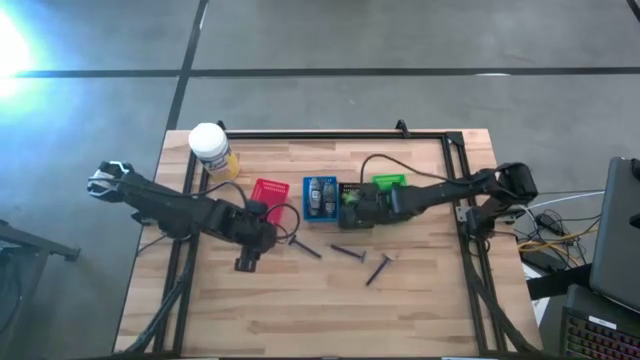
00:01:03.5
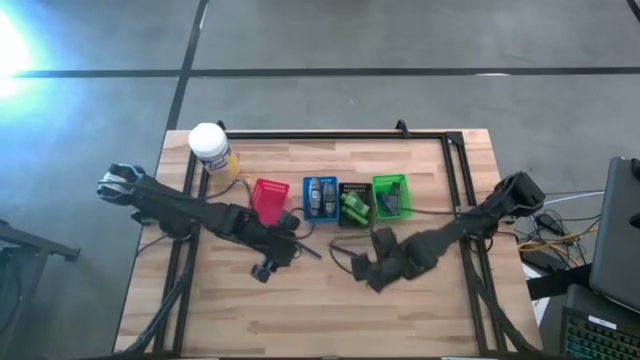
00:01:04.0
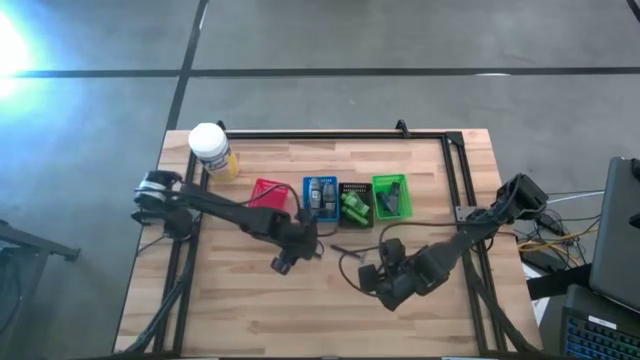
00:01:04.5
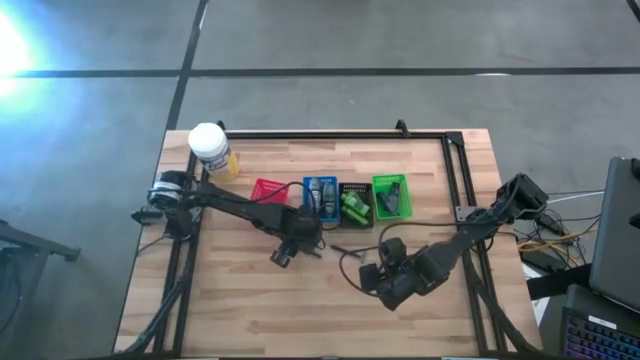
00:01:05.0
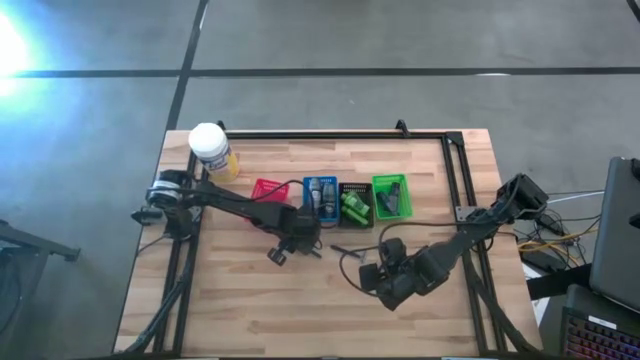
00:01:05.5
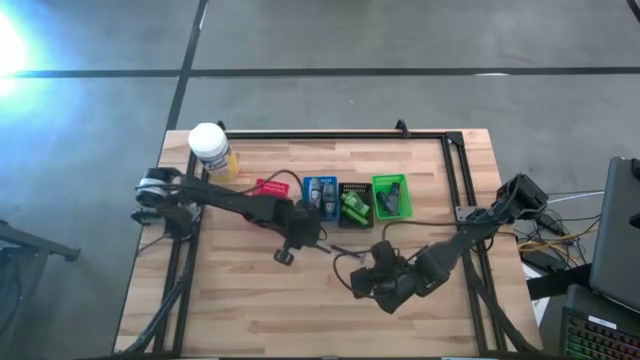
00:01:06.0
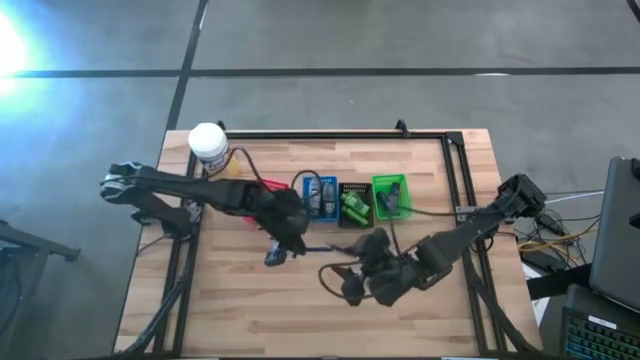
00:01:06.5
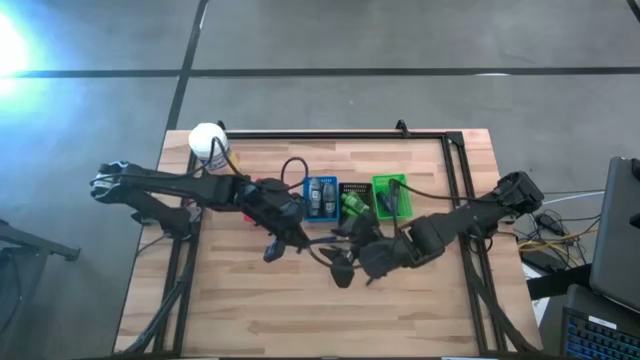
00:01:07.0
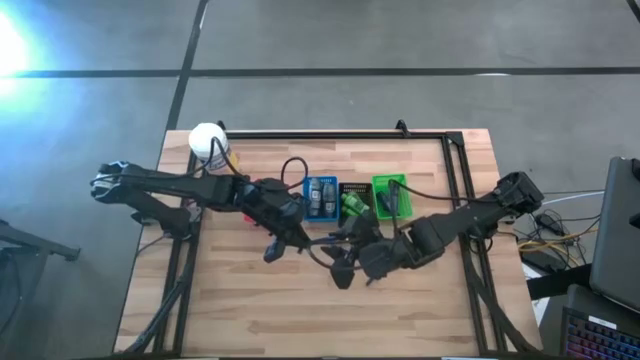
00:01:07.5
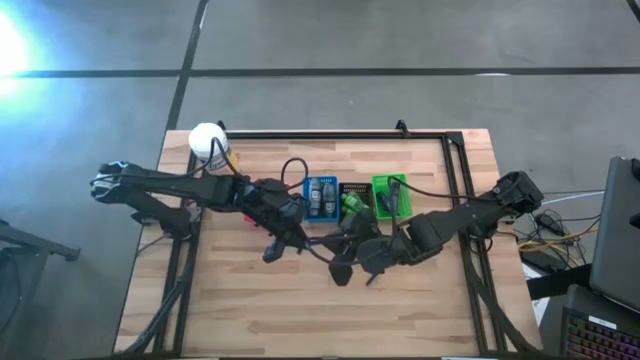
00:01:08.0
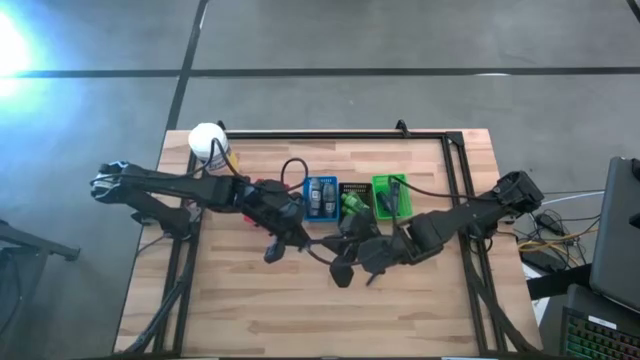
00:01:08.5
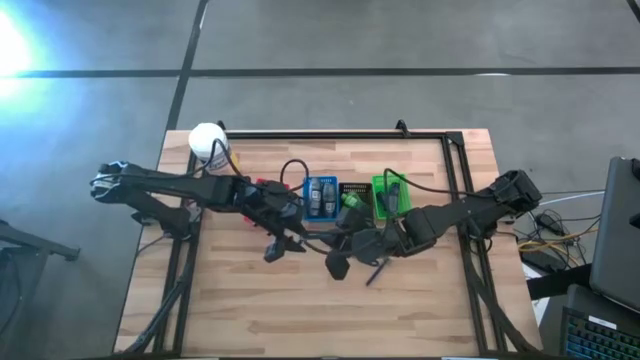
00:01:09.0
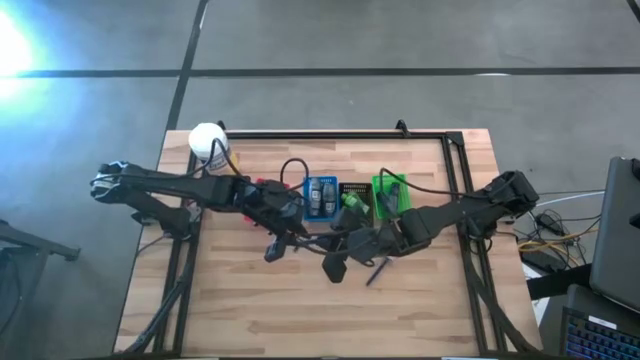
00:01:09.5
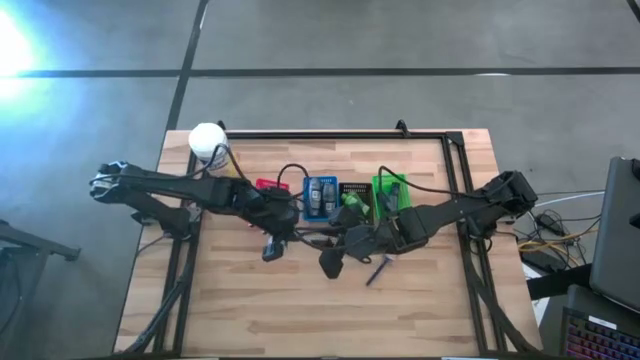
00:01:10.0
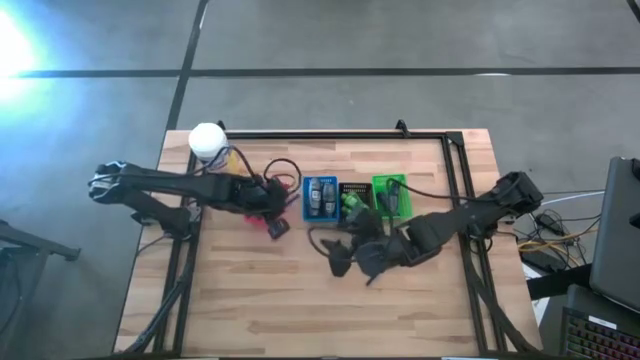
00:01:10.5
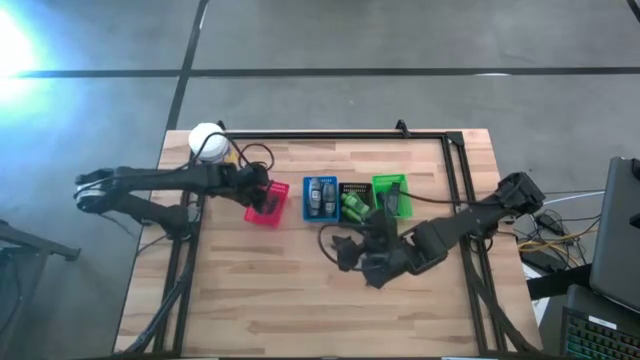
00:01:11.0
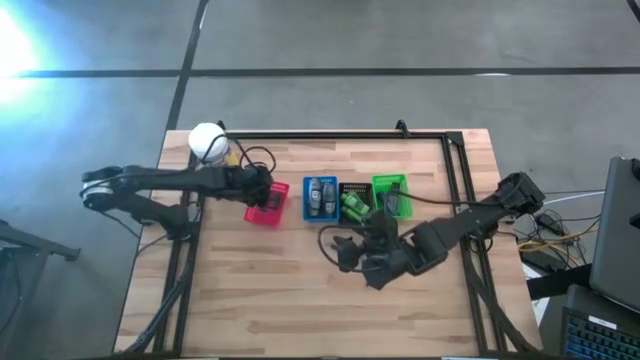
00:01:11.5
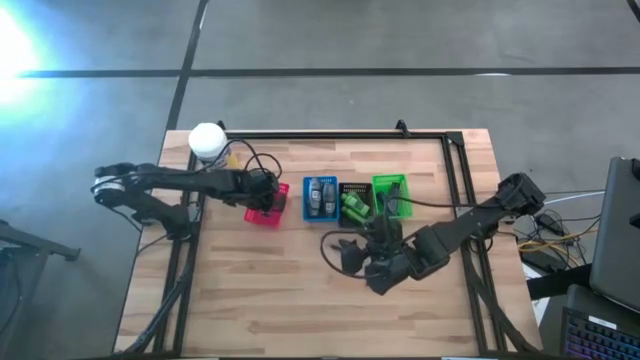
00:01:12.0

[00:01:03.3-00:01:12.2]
Task: Pick & Place Travel size toiletries
Put the blue razor into the red basket

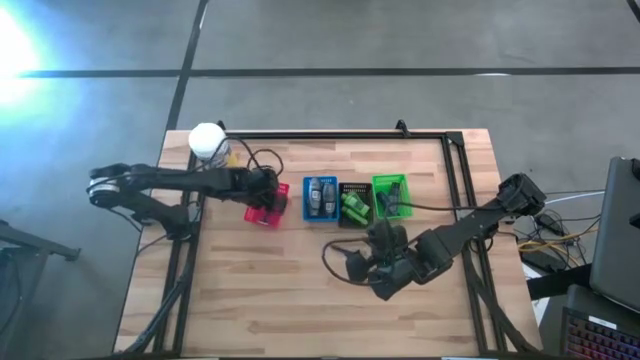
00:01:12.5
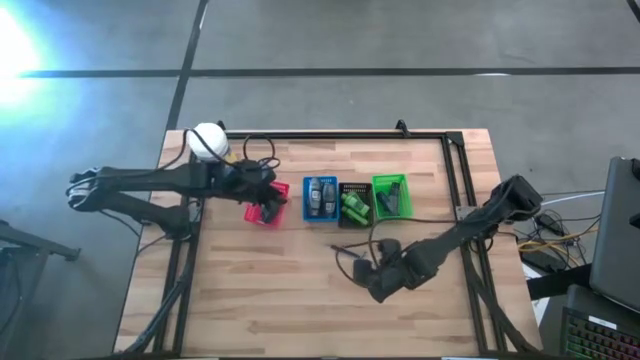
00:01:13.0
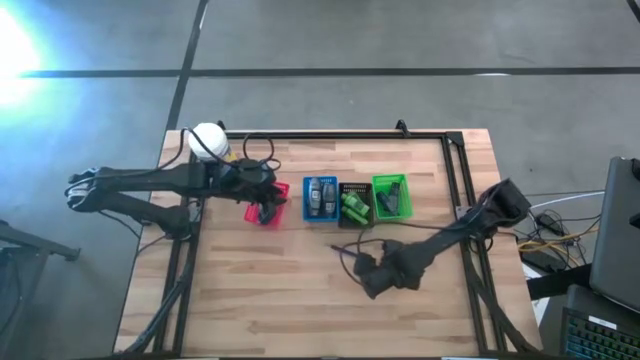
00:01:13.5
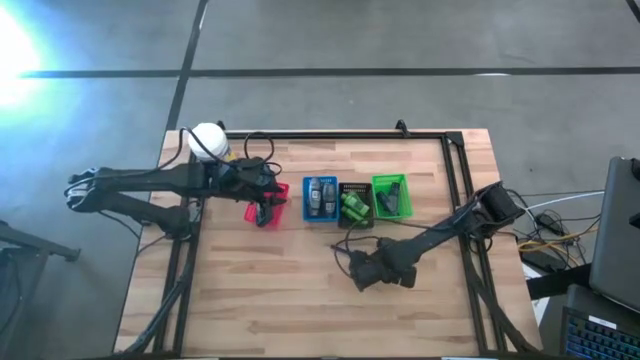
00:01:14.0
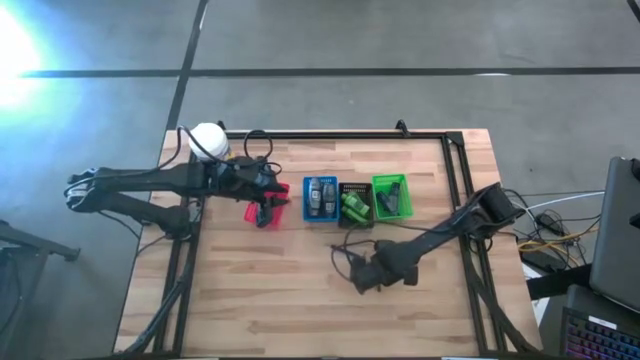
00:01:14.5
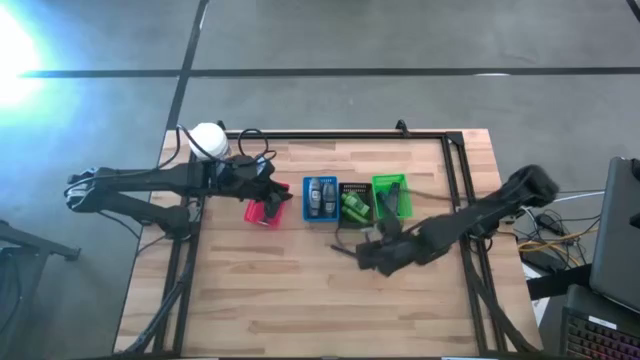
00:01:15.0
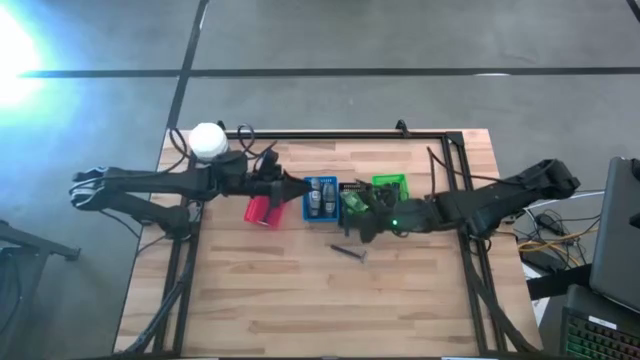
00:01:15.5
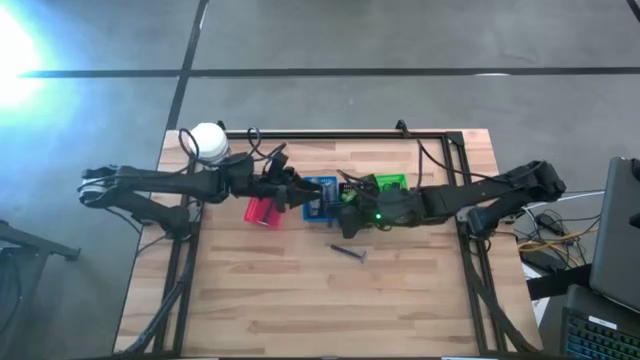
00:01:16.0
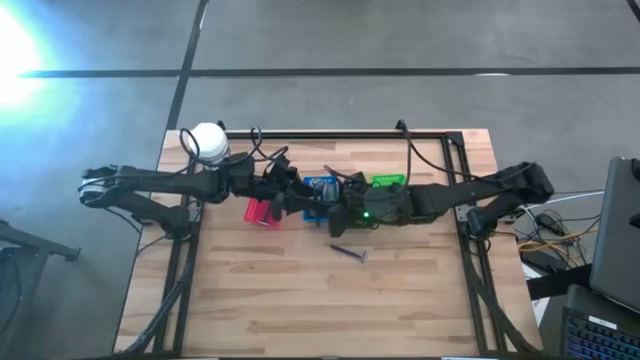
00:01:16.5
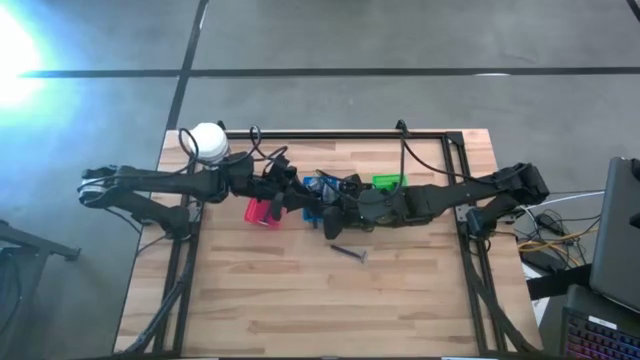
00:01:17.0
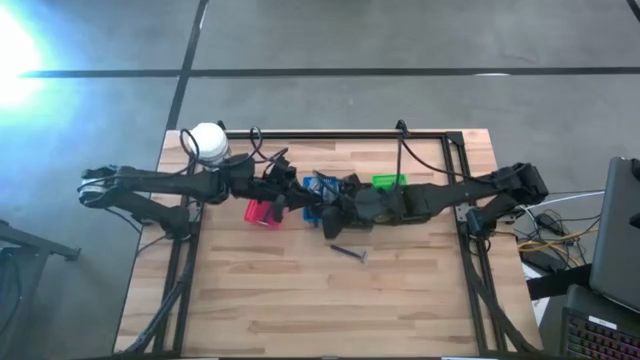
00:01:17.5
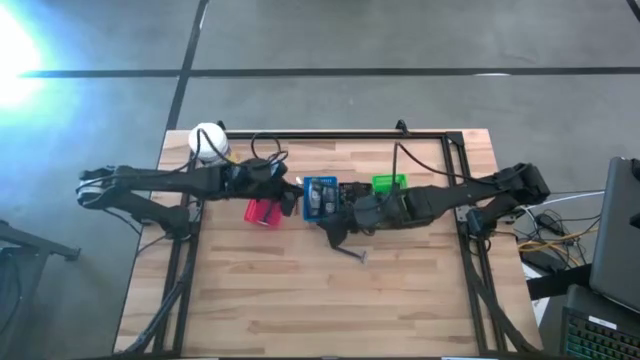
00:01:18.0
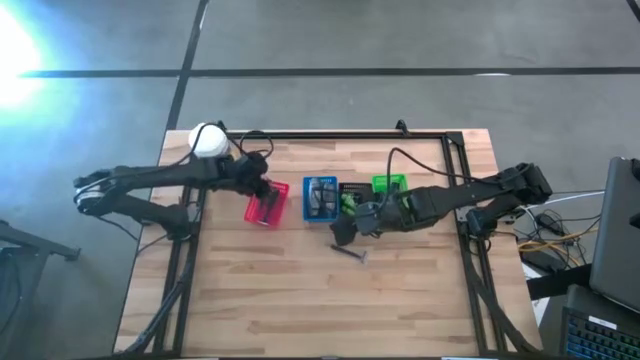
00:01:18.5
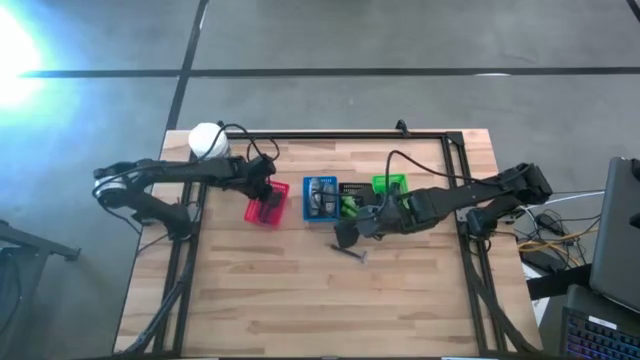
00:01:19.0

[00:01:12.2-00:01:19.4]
Put the blue razor into the red basket

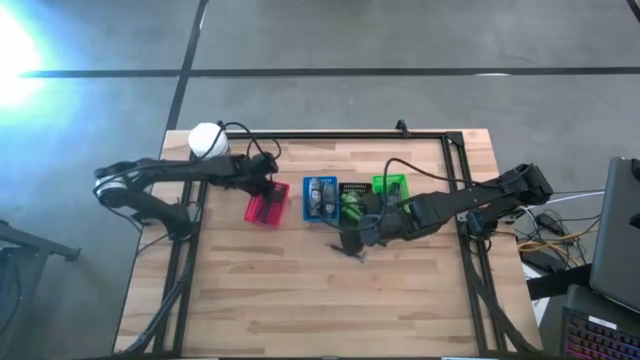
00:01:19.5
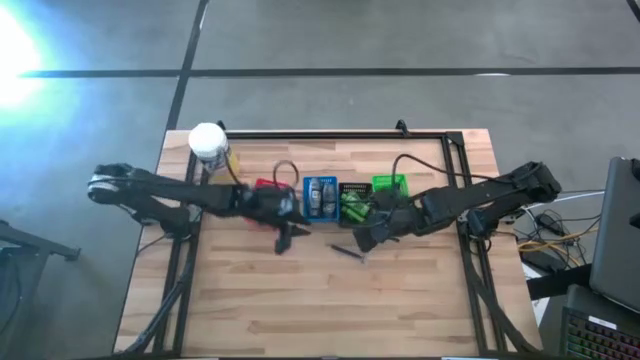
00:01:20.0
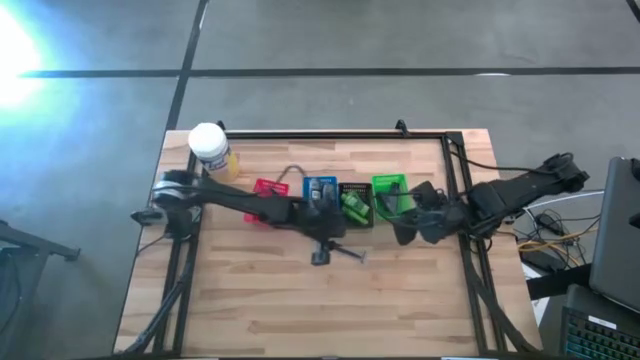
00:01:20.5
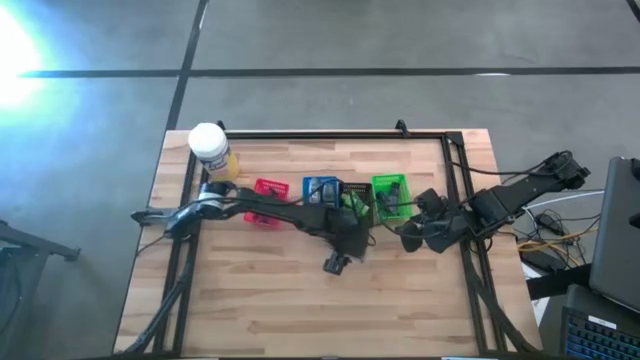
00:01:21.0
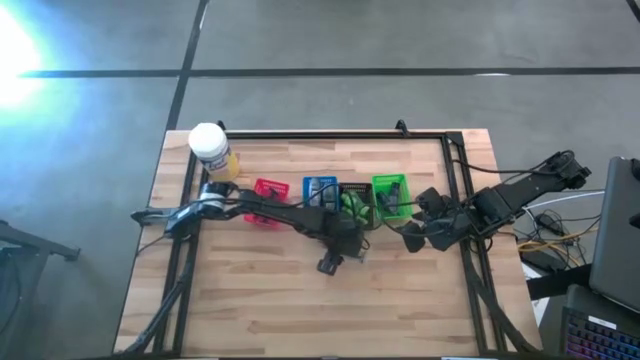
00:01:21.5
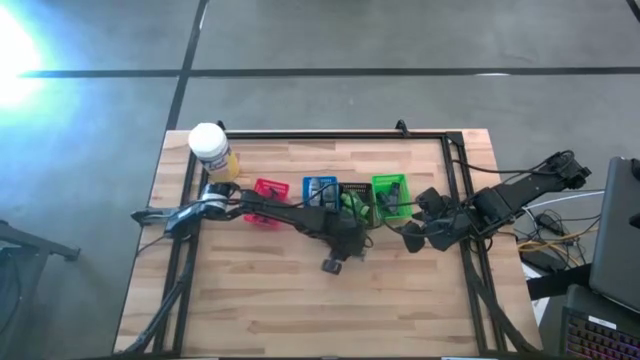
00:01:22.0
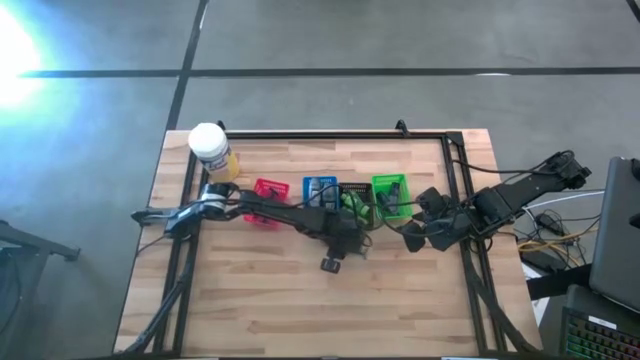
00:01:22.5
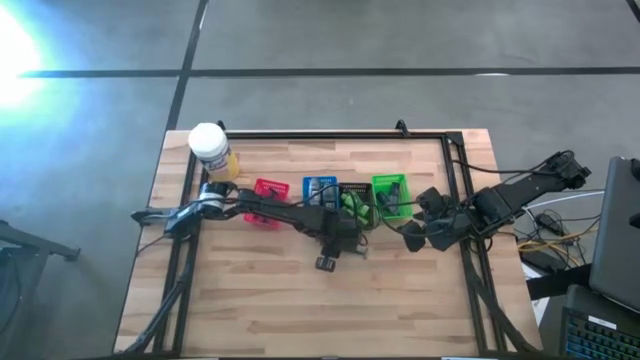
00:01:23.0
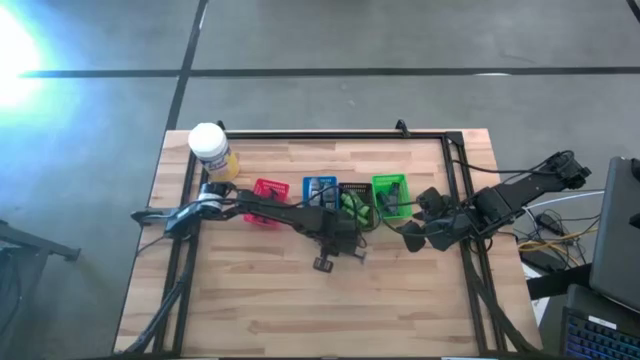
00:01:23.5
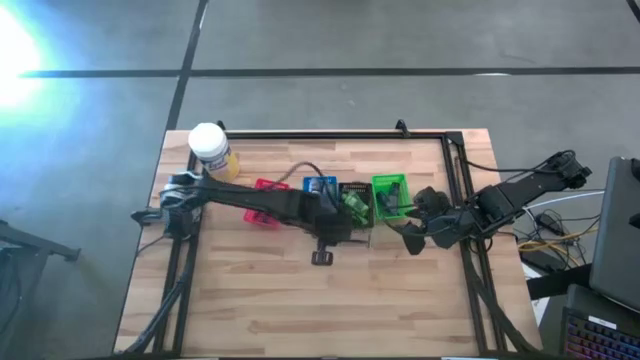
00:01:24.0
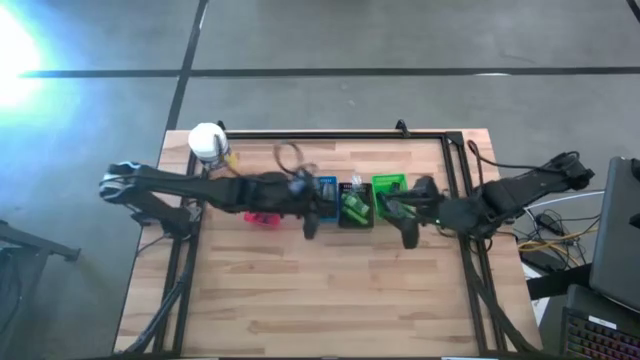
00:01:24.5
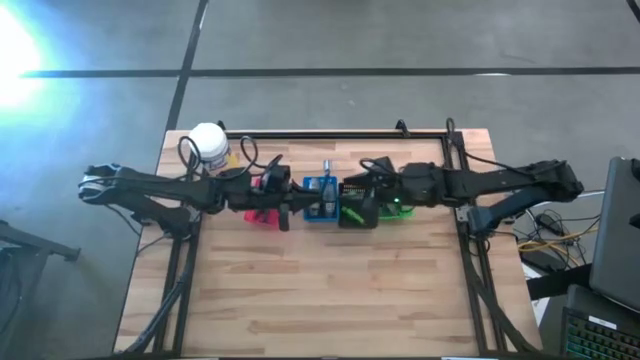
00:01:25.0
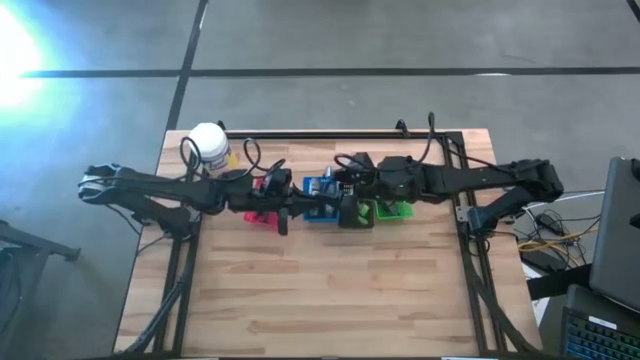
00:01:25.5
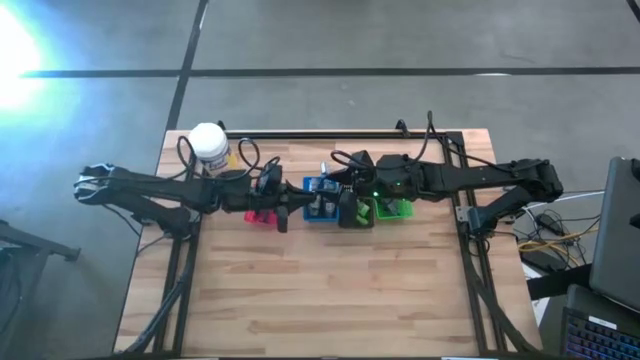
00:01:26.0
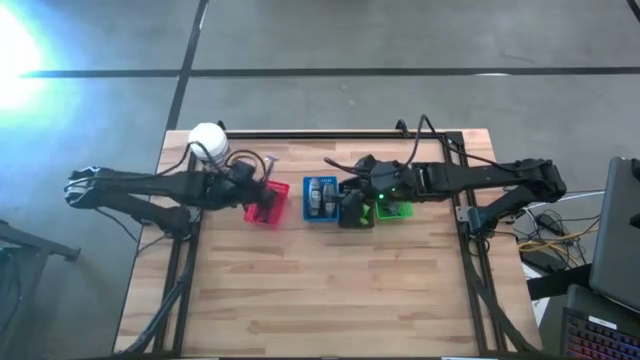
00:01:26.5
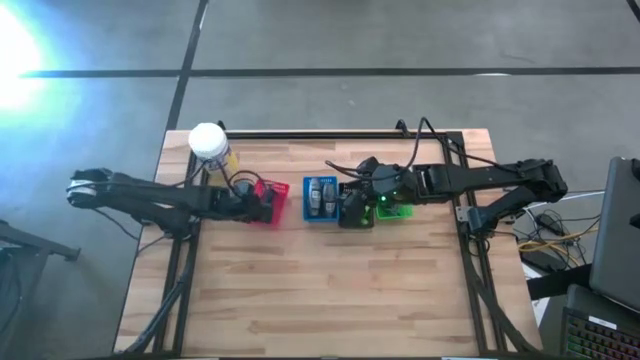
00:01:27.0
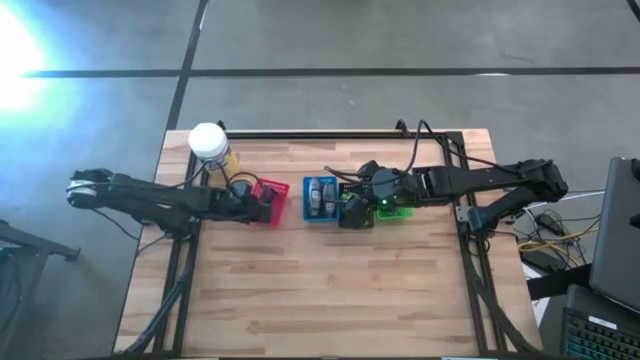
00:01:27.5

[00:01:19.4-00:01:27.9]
Put the blue razor into the red basket
